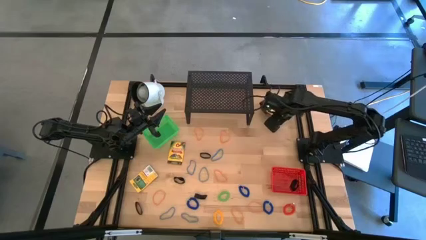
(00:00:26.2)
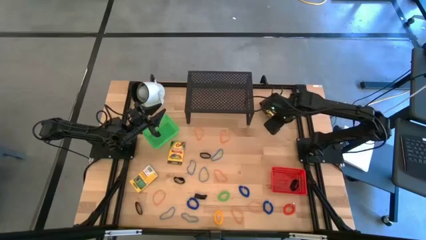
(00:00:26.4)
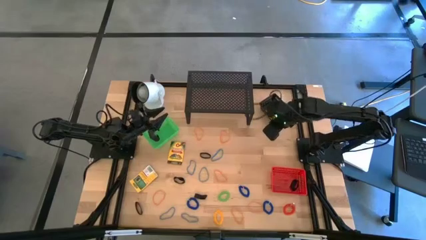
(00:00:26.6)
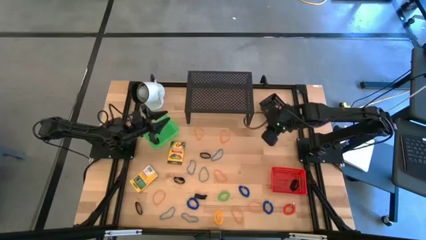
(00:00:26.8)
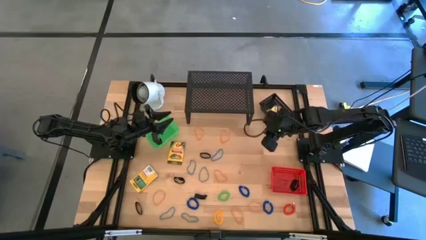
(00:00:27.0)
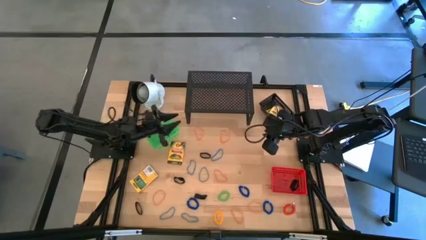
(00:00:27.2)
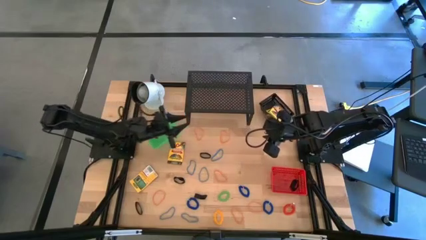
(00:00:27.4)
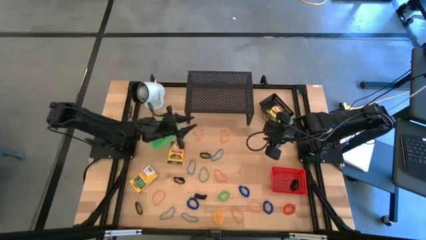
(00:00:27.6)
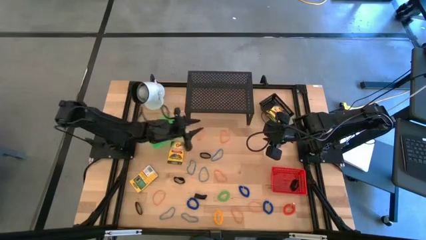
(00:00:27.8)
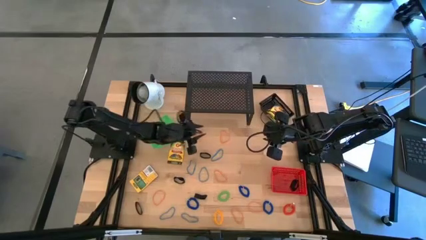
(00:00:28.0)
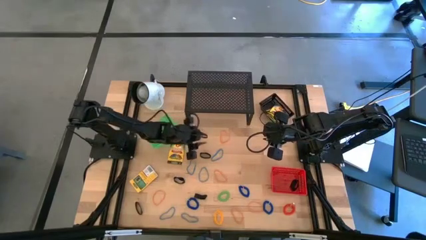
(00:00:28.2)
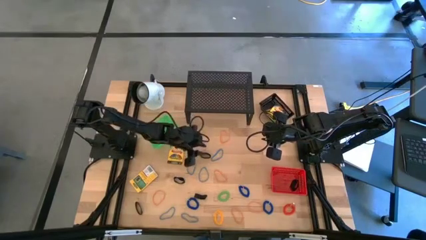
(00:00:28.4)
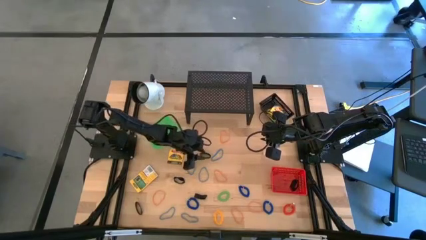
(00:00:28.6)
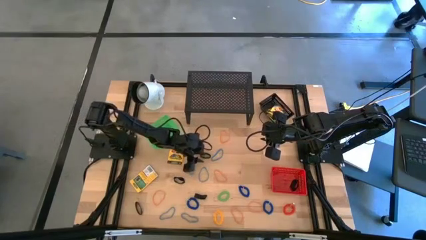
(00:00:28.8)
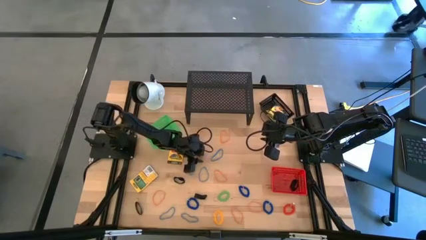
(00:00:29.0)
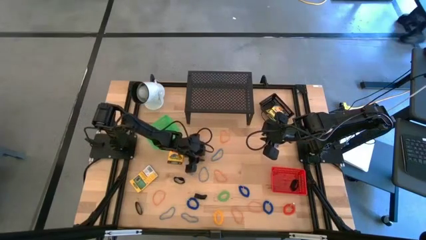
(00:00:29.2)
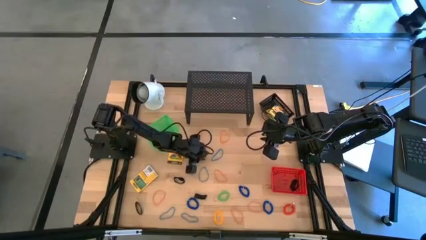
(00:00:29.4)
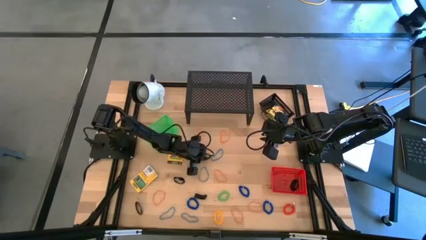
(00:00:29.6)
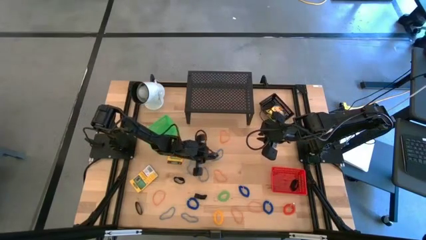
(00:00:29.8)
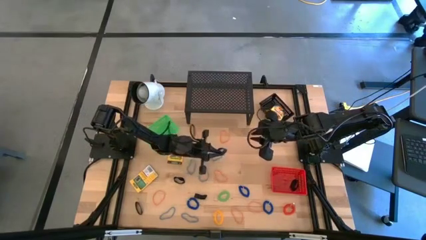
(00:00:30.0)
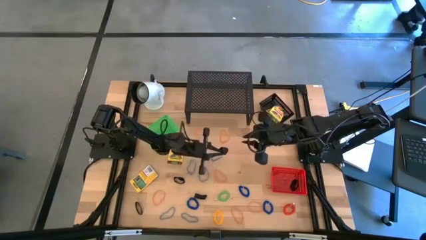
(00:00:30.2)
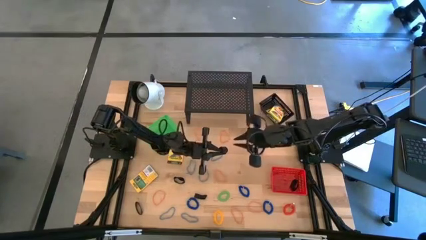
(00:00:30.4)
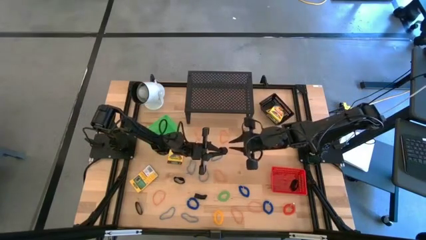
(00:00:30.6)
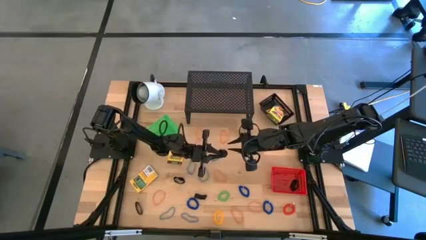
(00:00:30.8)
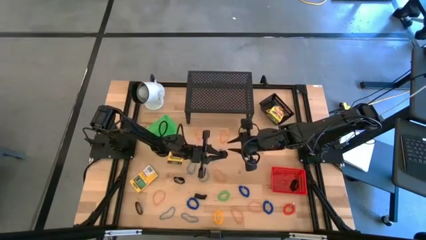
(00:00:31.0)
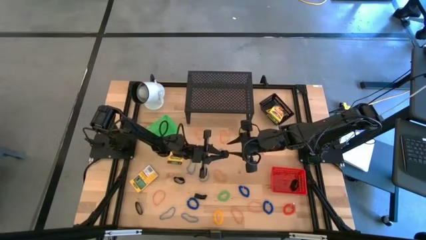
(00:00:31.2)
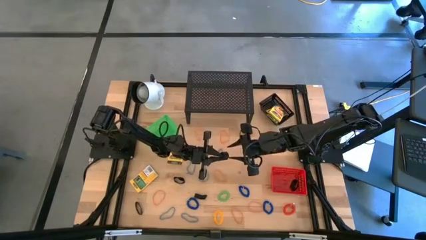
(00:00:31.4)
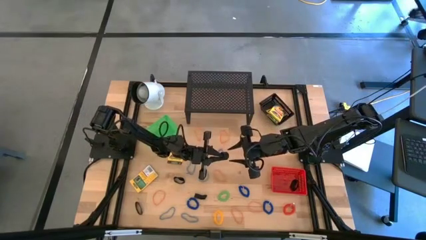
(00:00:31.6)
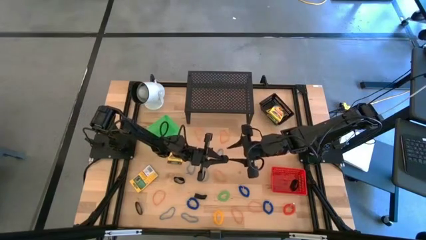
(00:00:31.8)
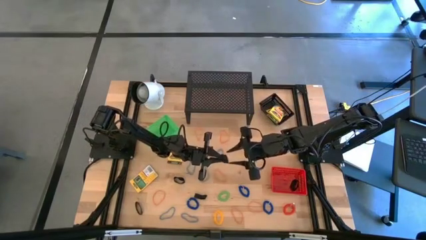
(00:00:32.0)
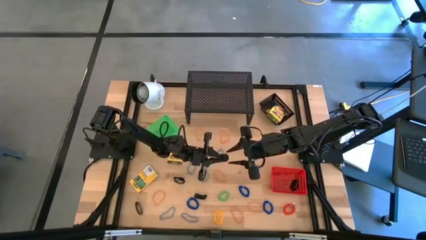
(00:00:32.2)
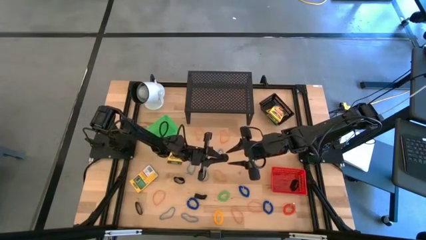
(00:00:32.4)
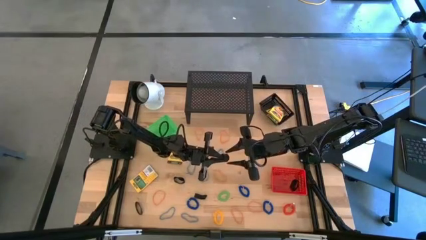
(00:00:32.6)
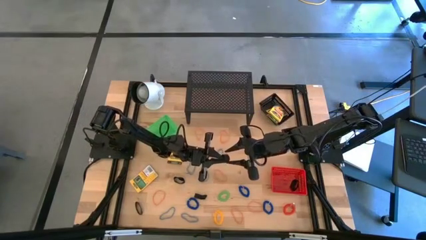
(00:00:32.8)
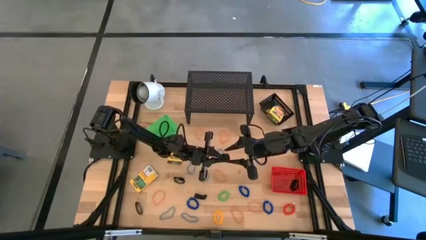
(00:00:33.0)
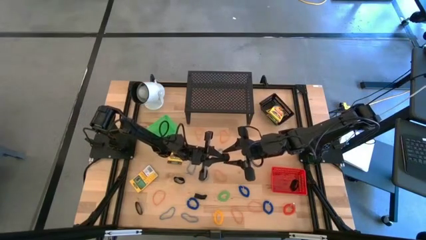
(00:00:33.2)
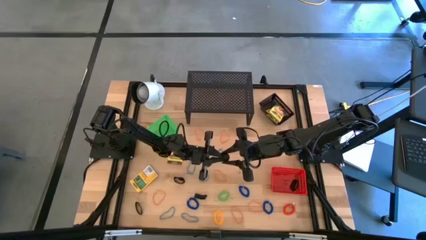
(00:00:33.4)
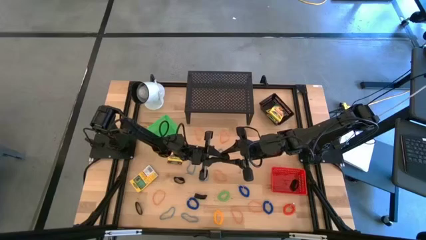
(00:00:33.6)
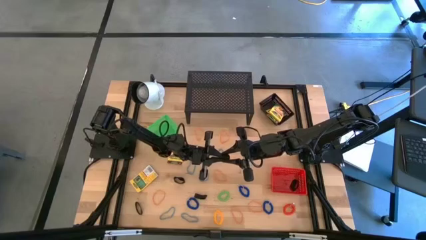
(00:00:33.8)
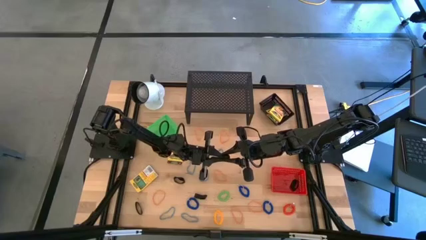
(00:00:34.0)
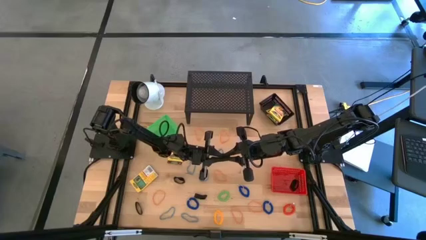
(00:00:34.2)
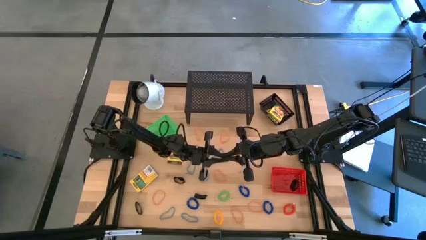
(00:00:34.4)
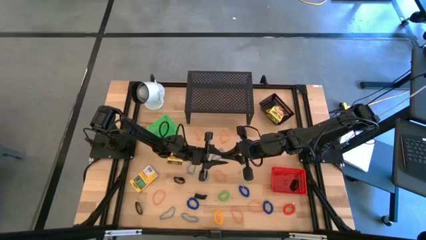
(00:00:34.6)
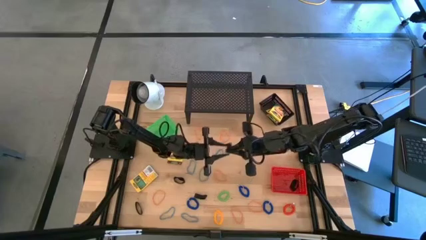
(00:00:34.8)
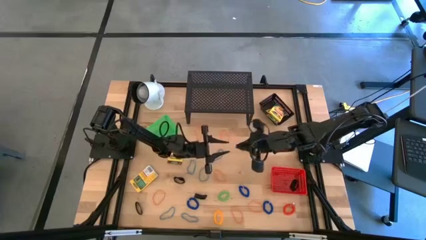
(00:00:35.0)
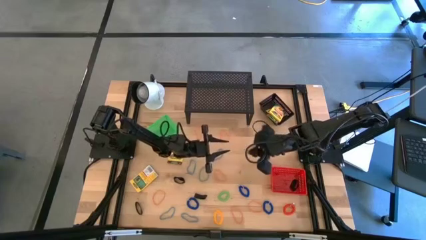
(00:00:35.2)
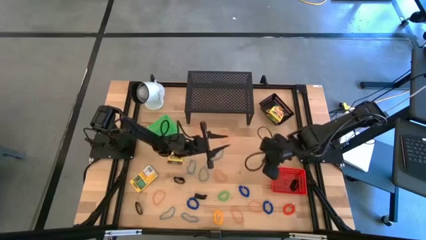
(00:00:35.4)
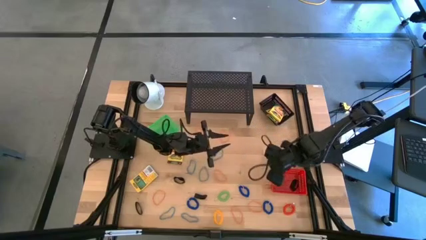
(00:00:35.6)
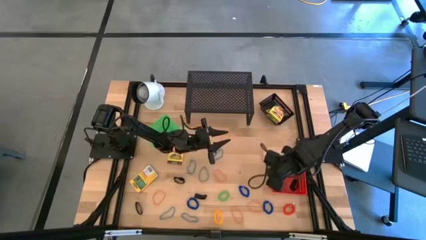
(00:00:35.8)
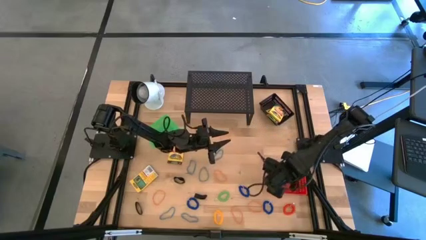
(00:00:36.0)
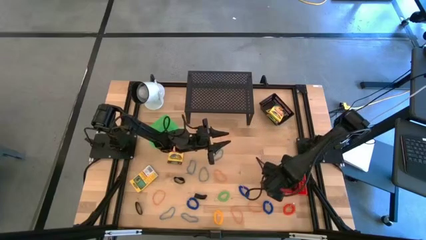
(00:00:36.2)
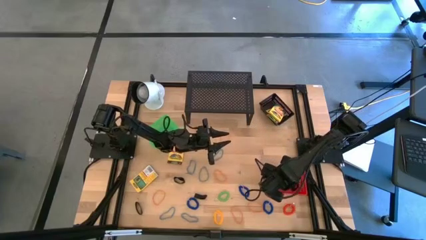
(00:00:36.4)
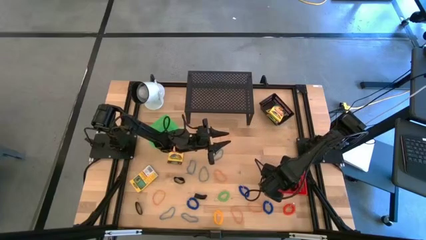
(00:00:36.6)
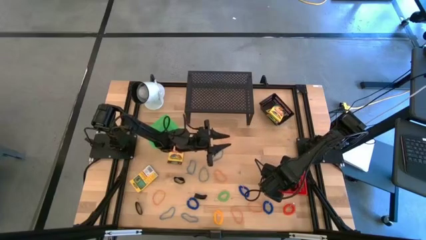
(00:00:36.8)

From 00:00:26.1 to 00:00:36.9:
Task: Pick & Place Office Desk Supplies
Put the black rubber band into the red bin
